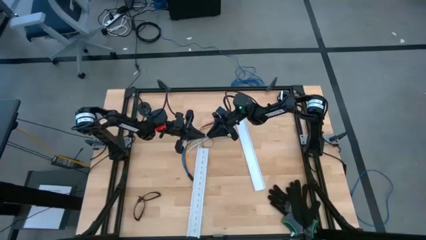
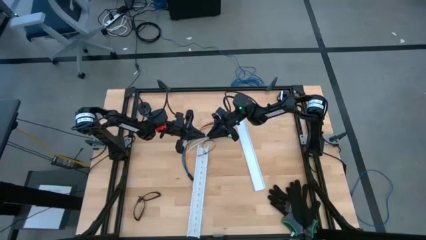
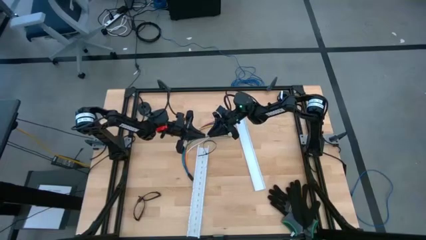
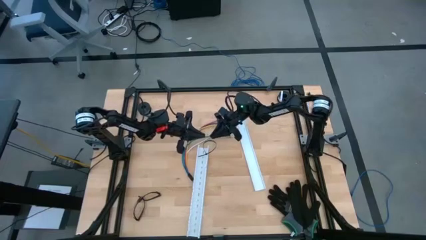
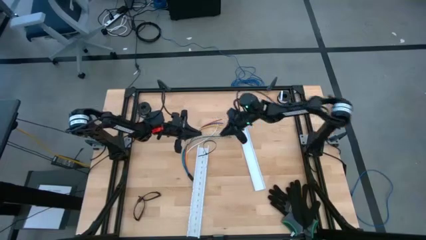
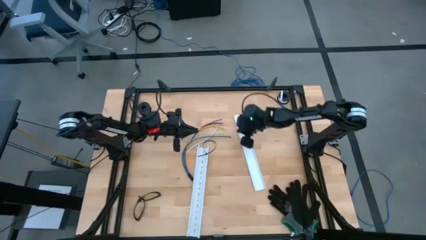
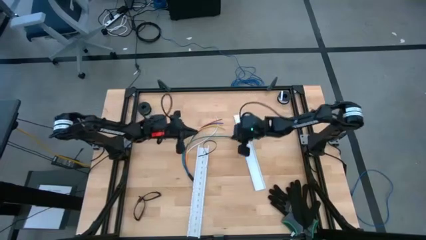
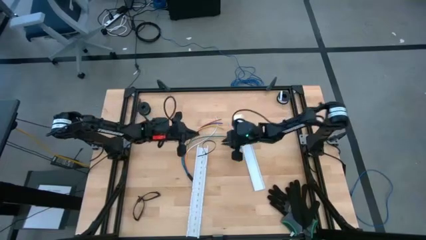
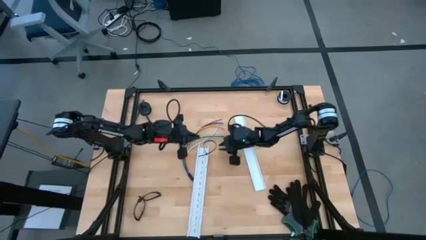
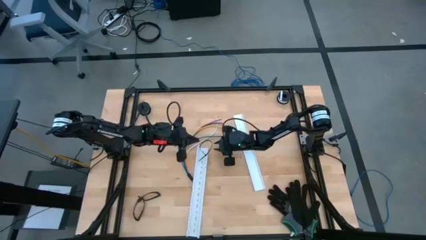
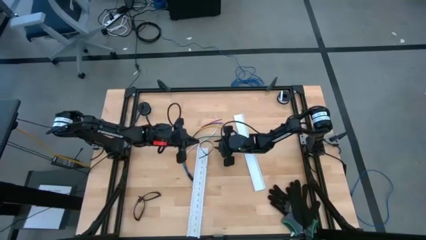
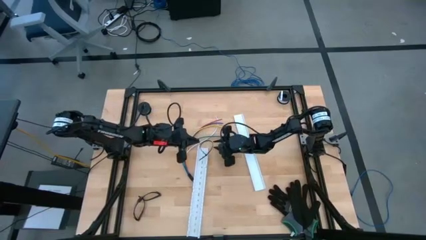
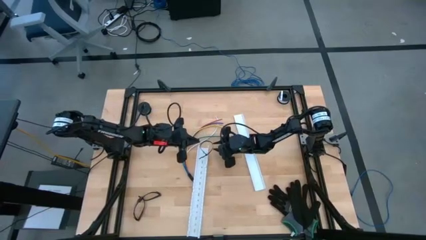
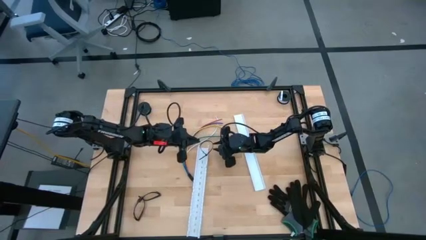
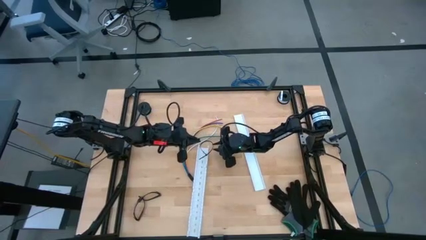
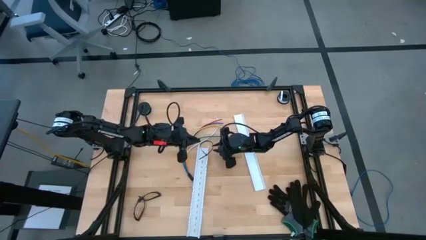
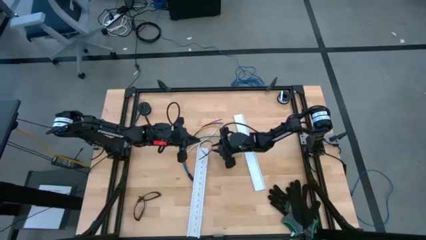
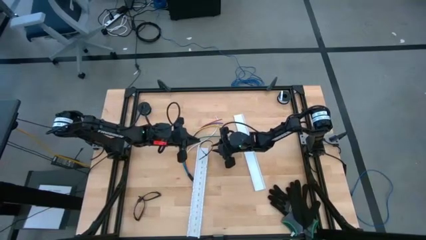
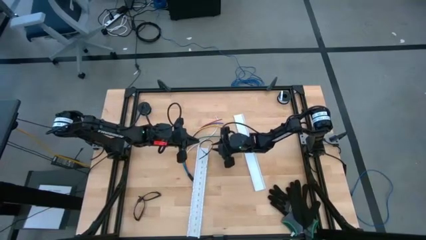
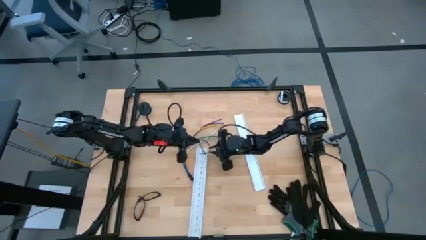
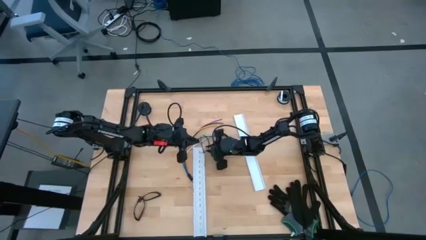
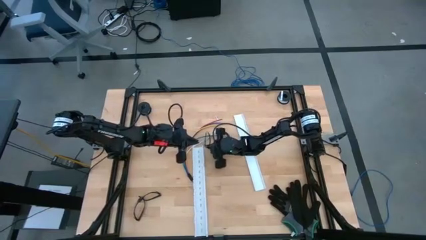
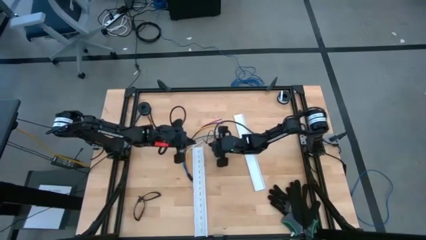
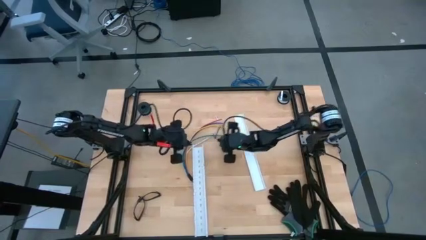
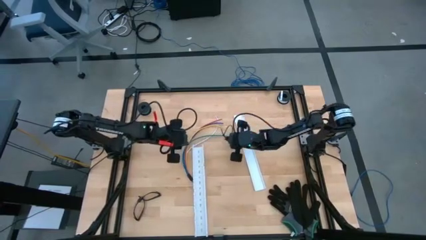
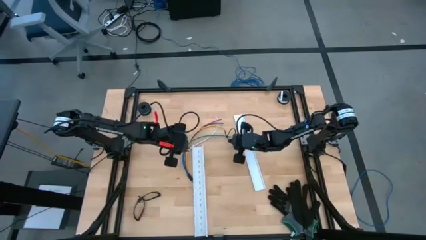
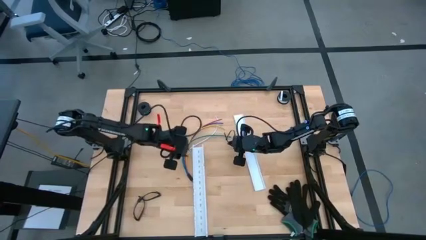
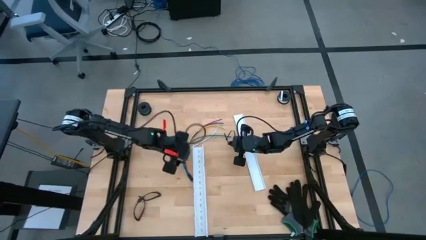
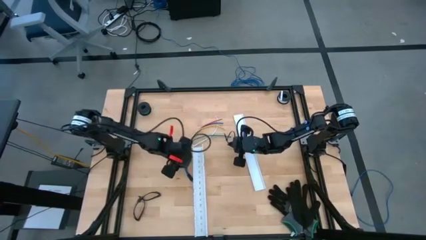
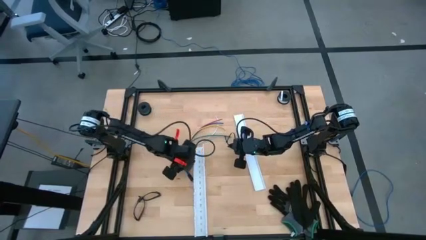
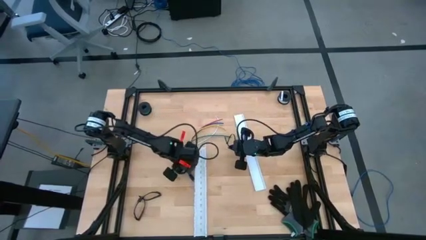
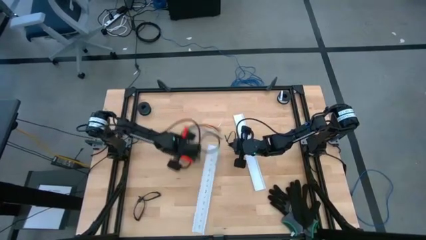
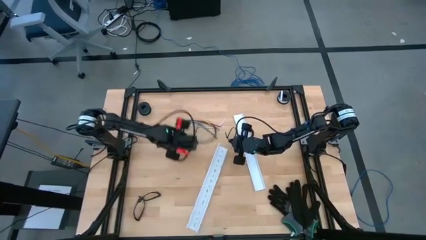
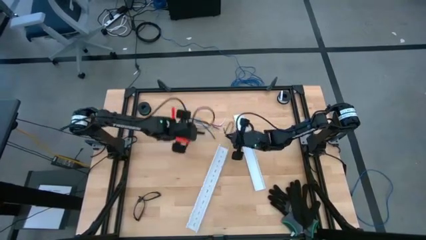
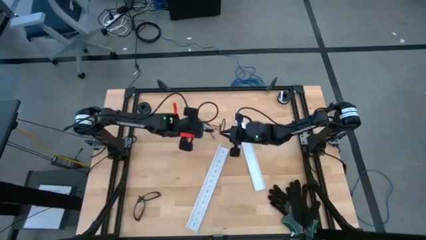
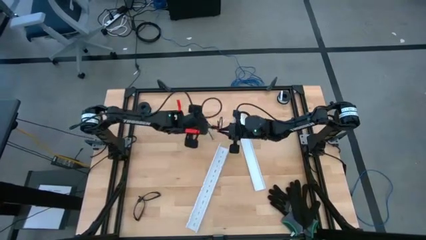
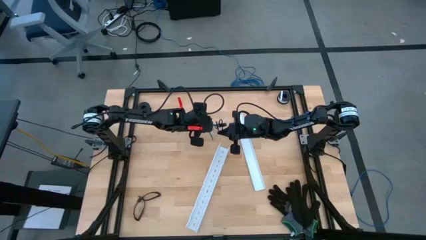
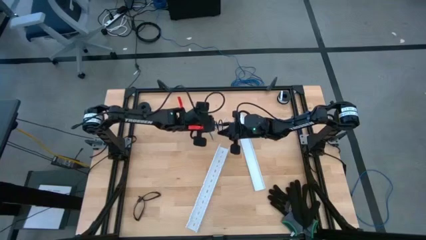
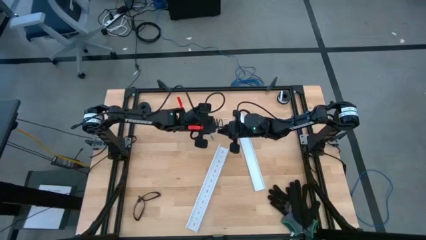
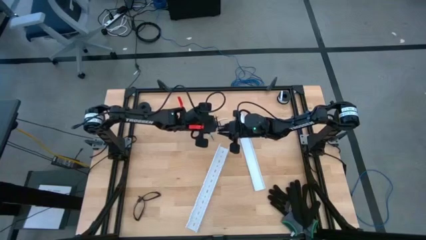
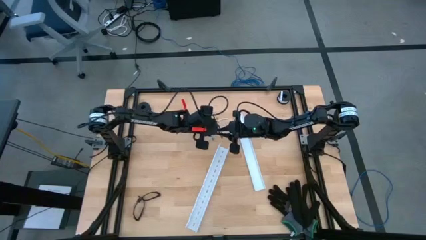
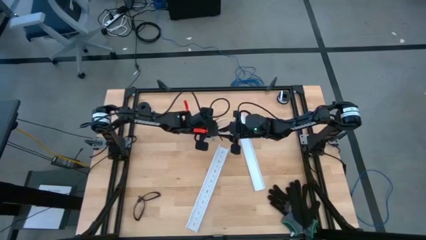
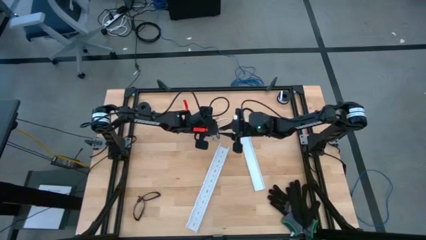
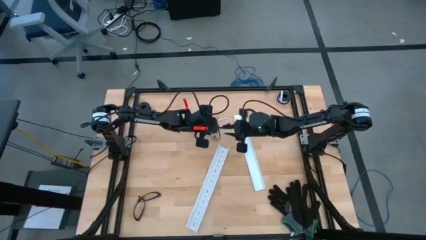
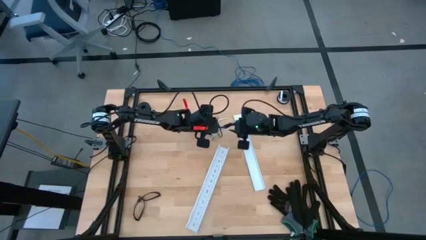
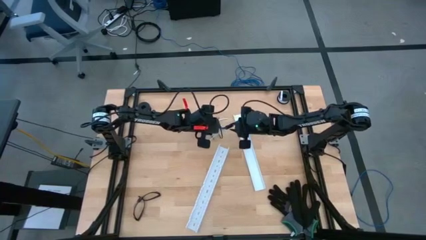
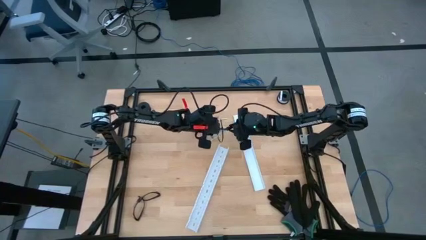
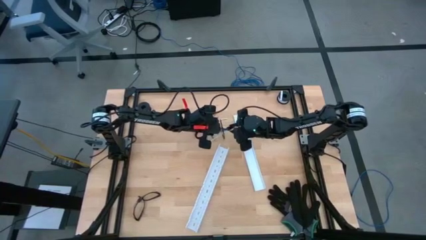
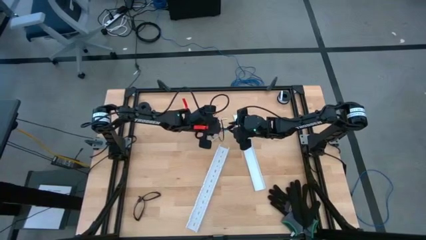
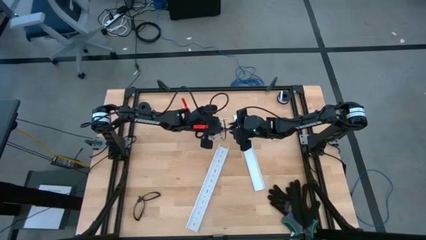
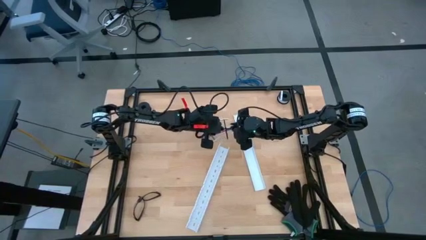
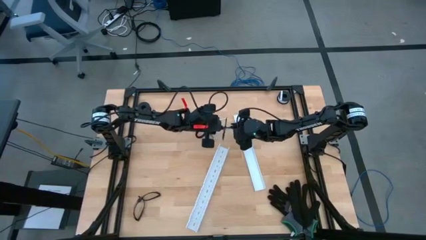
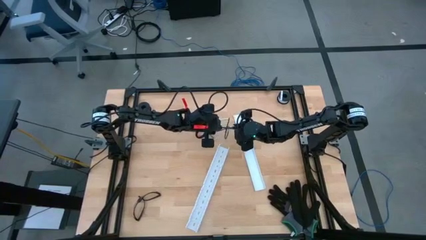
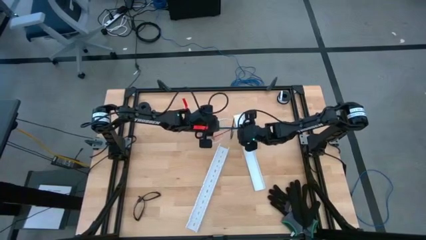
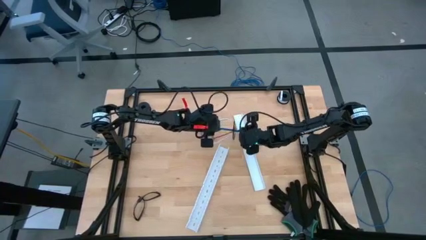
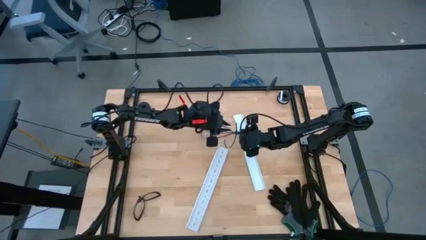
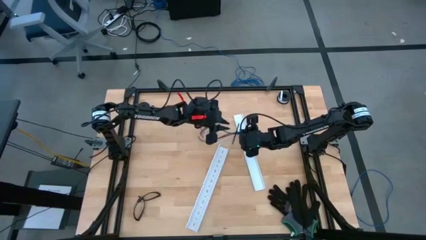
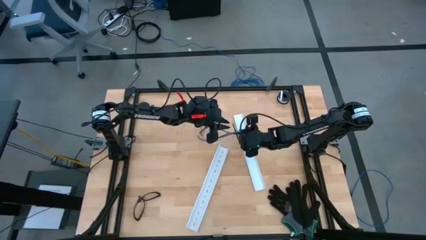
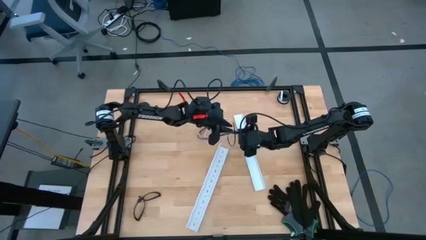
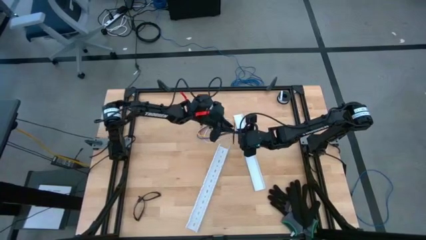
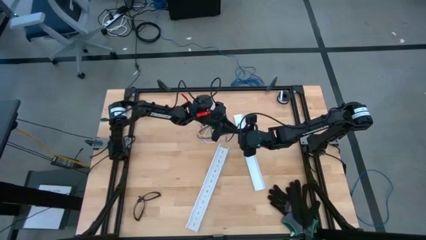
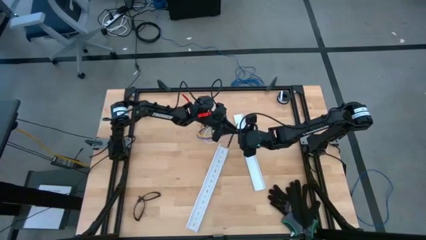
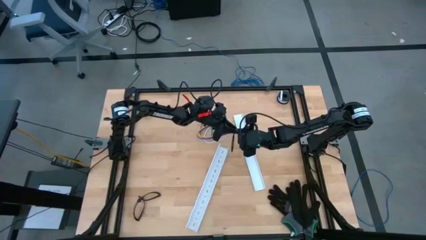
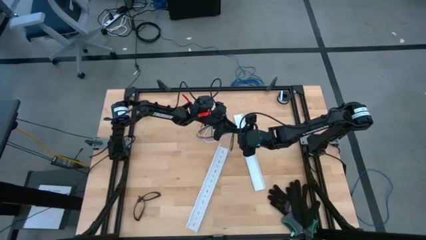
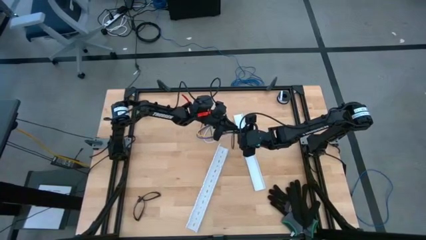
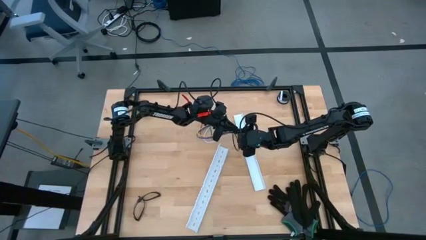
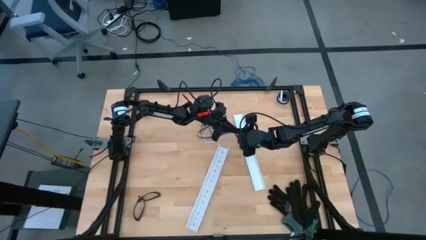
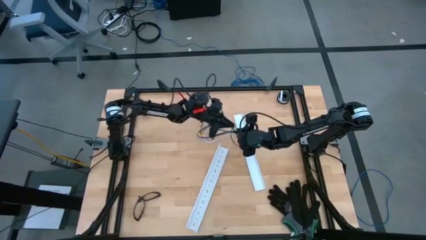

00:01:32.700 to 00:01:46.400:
Task: Ziptie cables
Wrap the cable wire in the zip tie

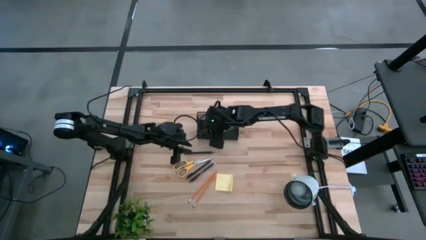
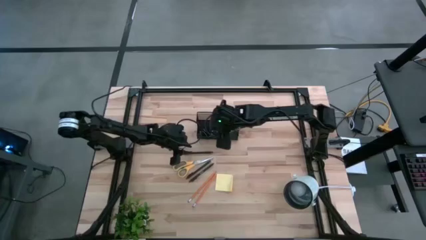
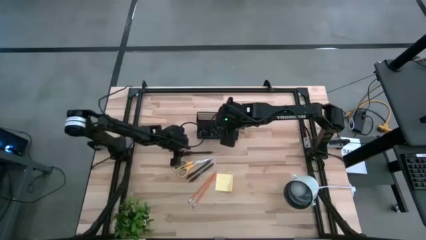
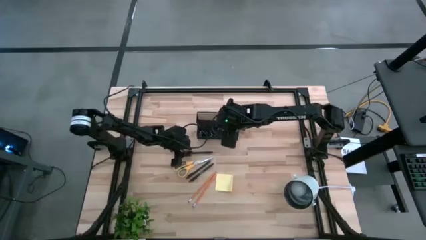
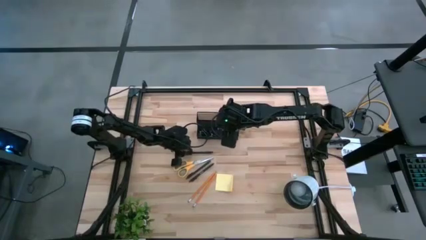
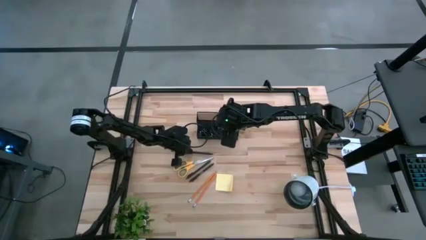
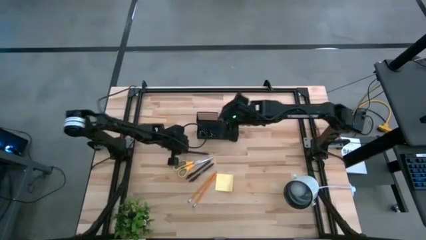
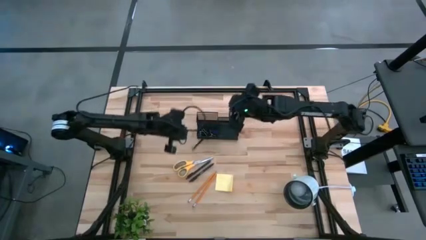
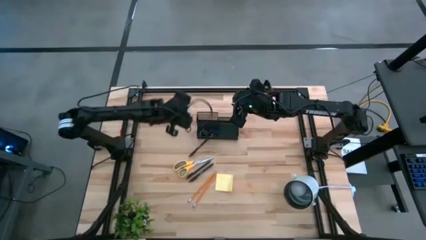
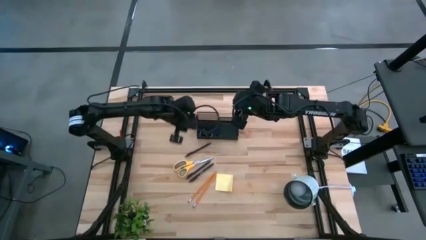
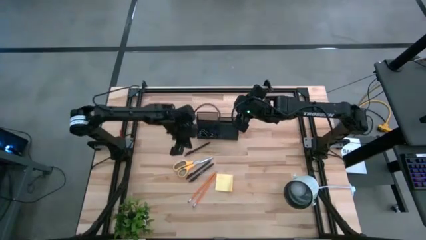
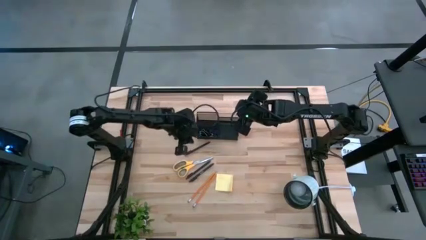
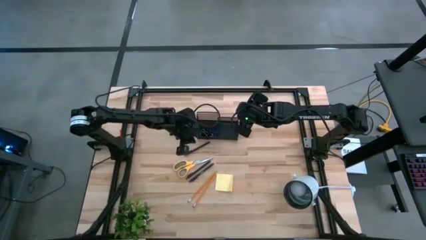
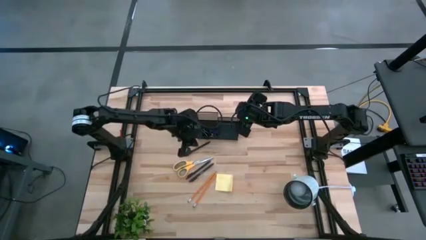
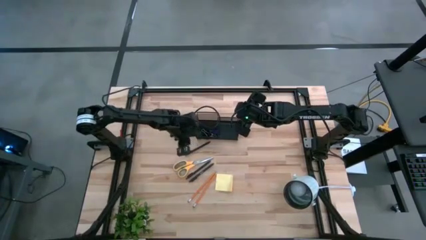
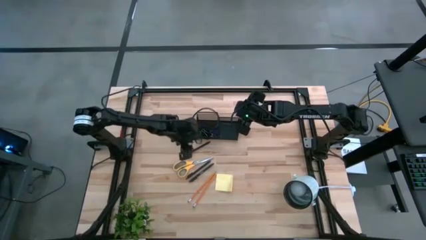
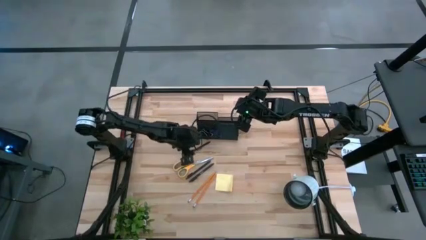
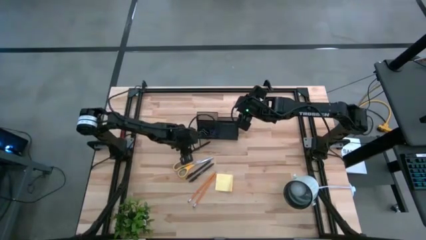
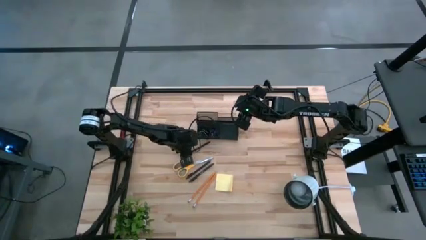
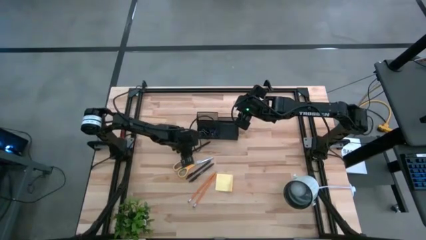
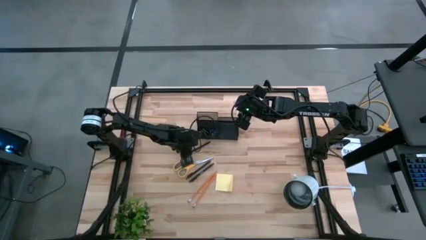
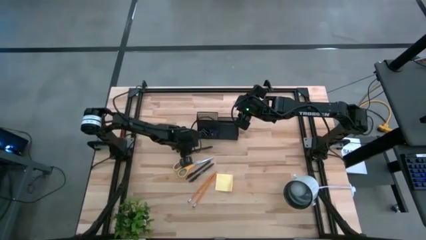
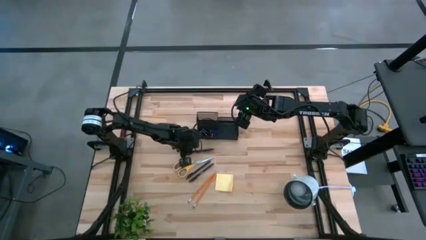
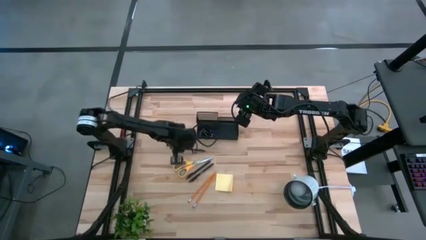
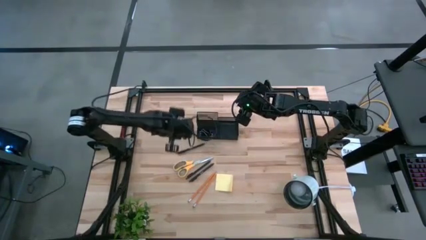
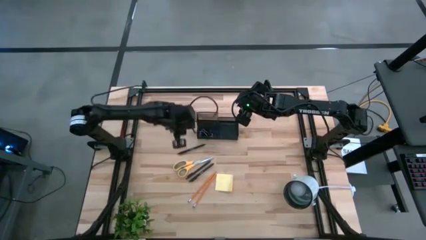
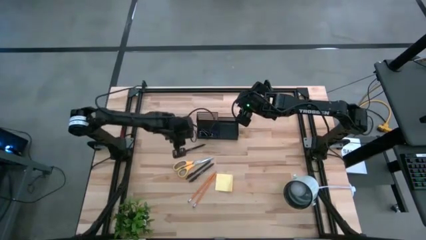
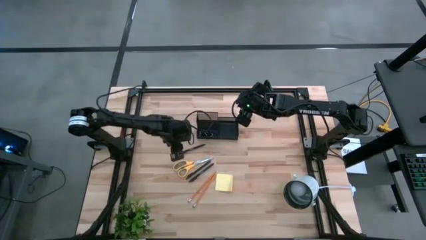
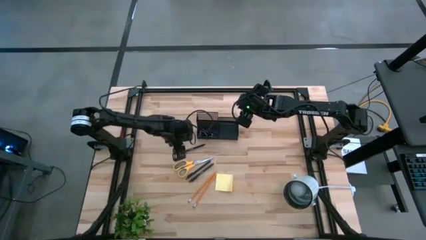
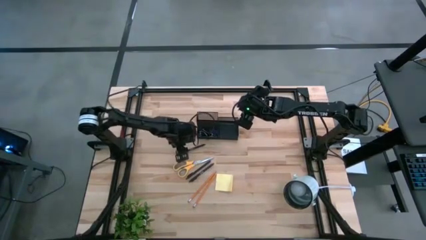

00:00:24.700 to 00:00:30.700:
Task: Pick and place office supplies into organizer
Put the top black pen into the black organizer bin
